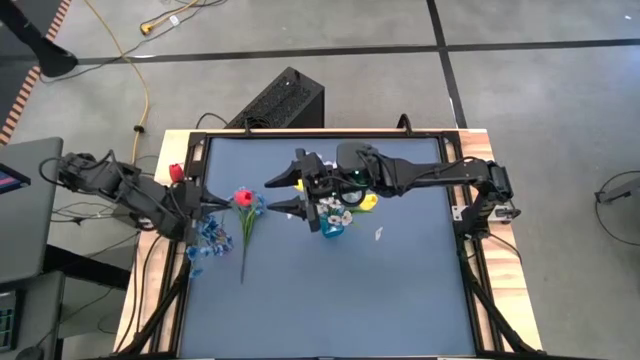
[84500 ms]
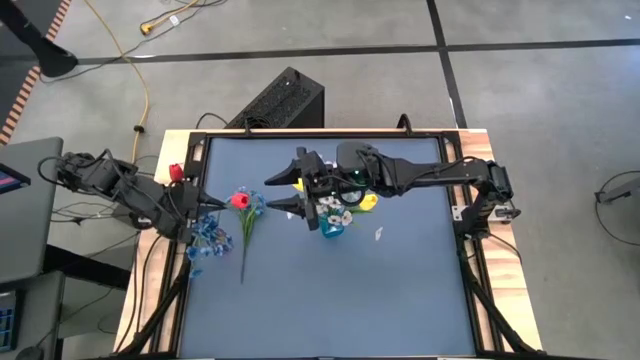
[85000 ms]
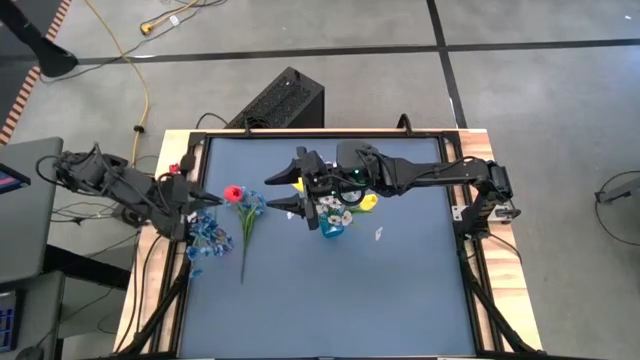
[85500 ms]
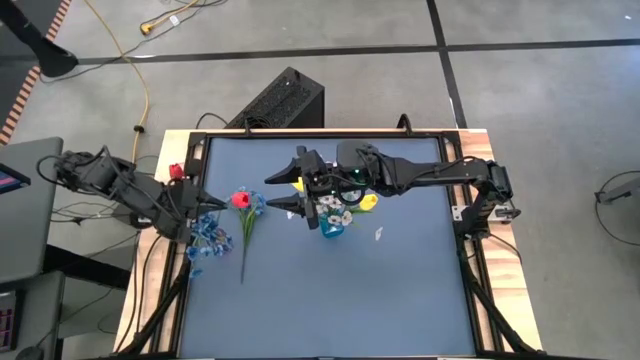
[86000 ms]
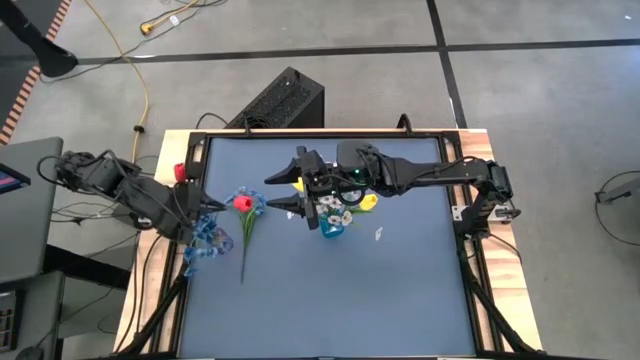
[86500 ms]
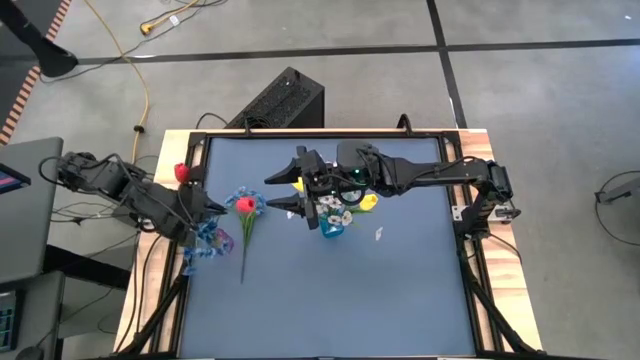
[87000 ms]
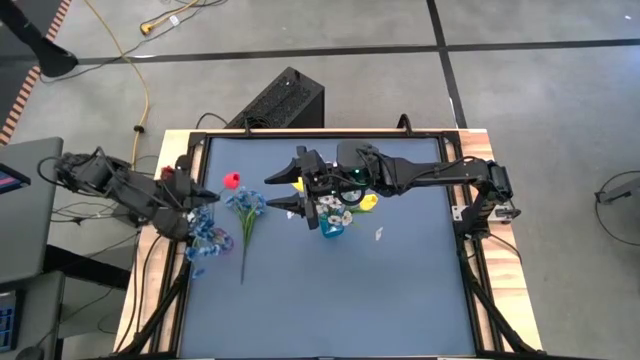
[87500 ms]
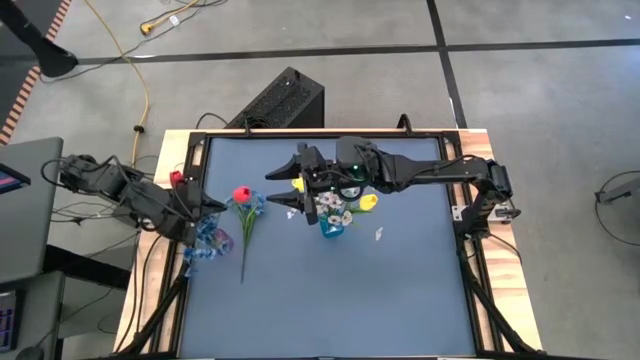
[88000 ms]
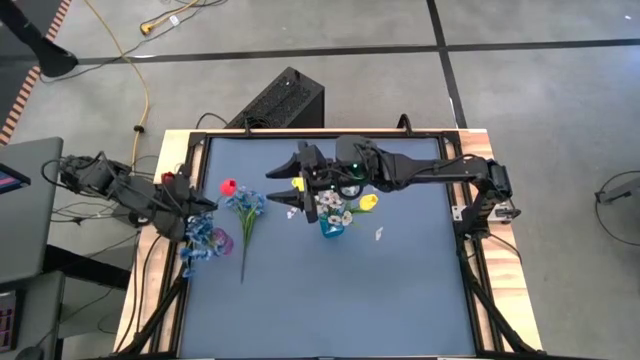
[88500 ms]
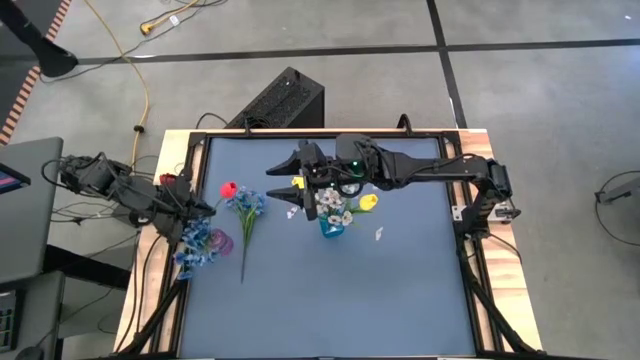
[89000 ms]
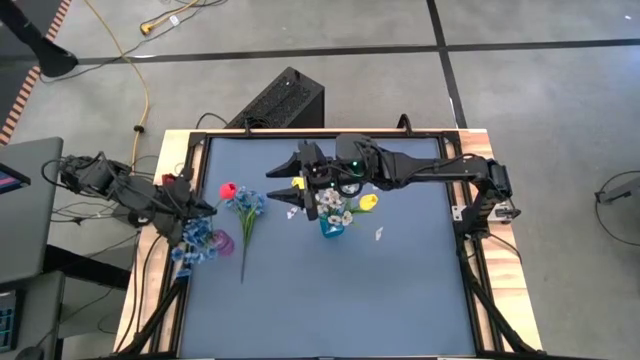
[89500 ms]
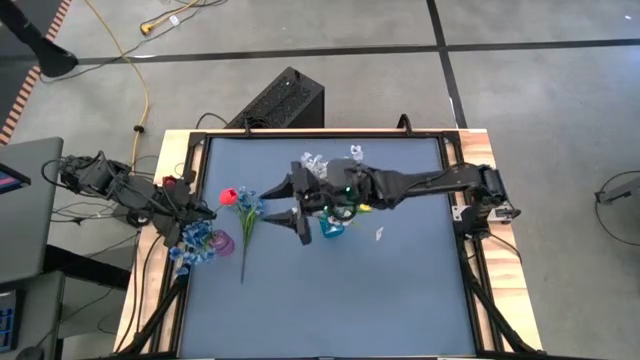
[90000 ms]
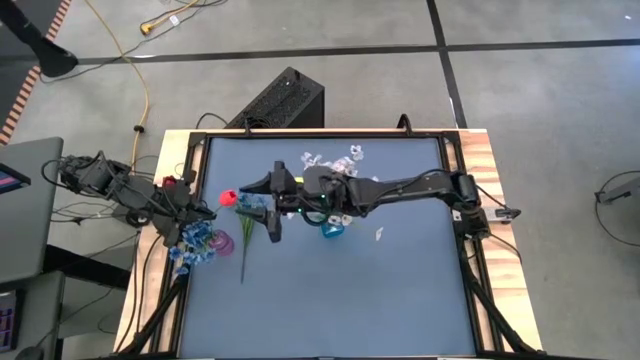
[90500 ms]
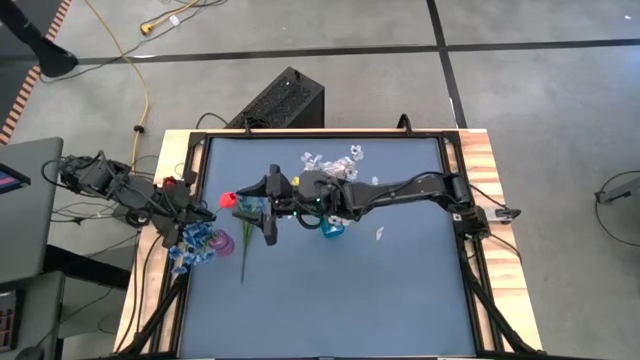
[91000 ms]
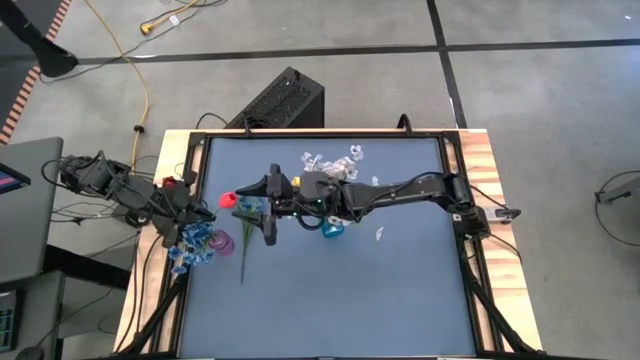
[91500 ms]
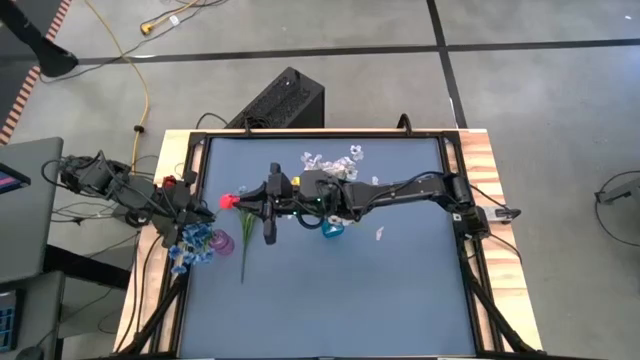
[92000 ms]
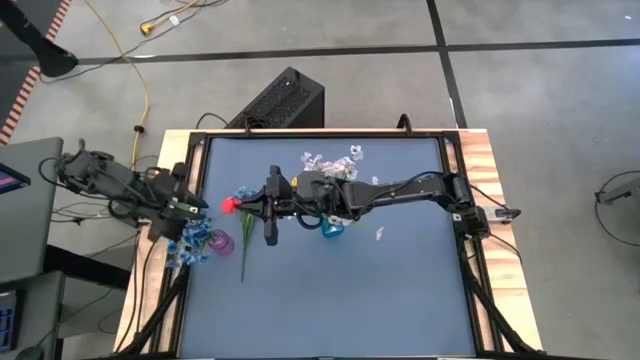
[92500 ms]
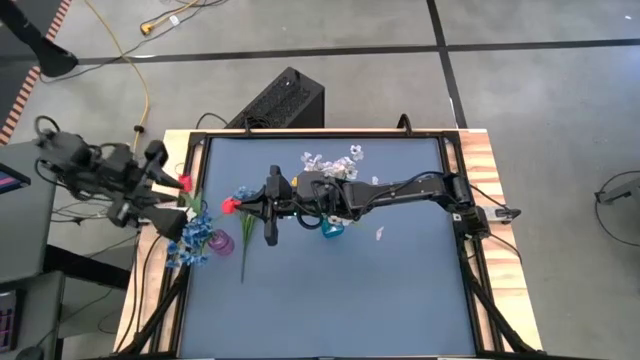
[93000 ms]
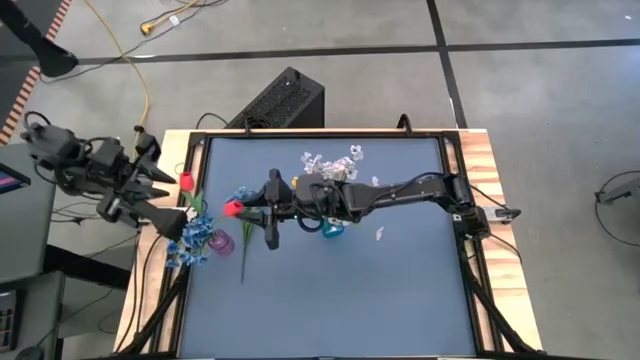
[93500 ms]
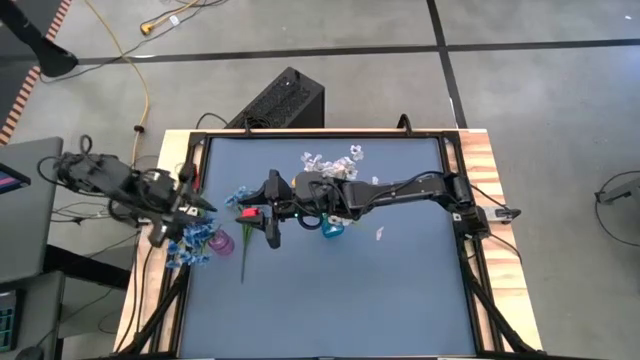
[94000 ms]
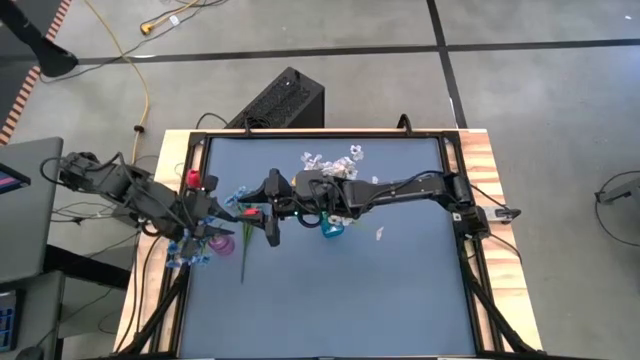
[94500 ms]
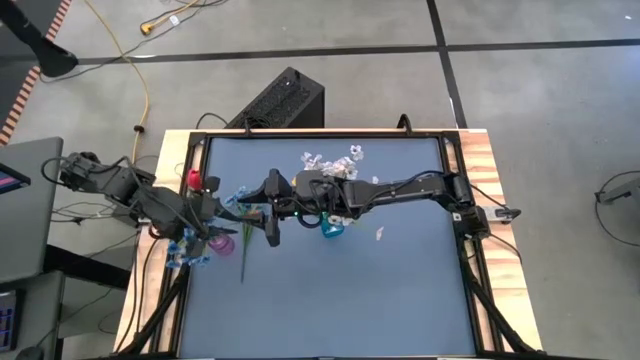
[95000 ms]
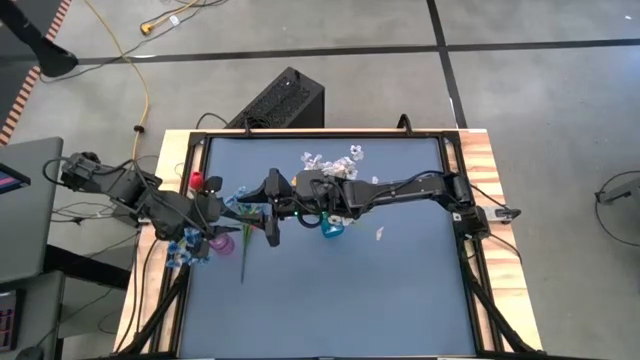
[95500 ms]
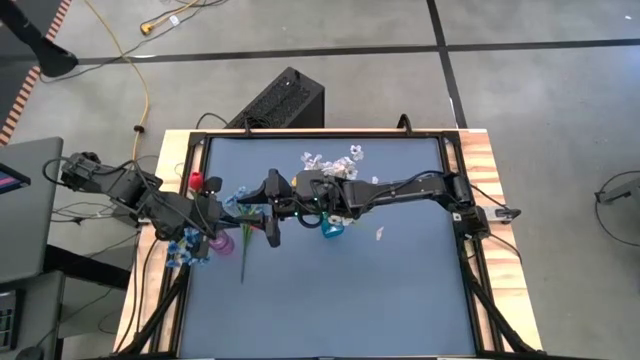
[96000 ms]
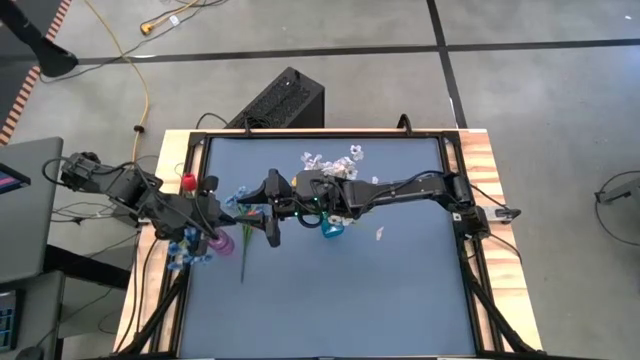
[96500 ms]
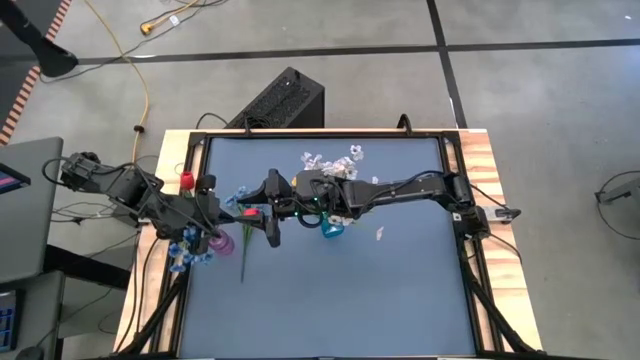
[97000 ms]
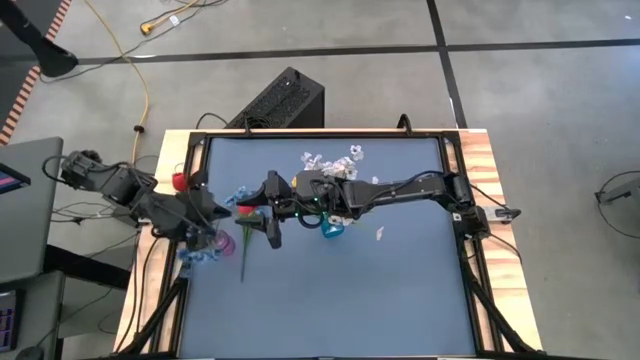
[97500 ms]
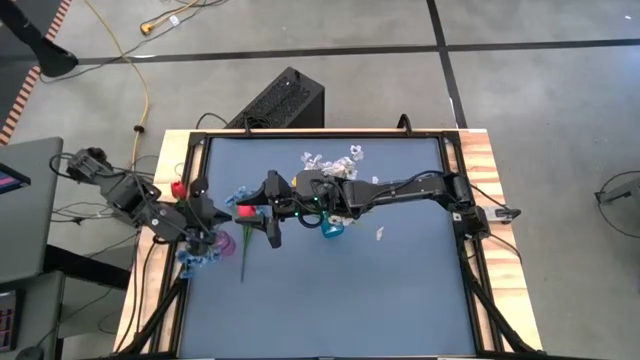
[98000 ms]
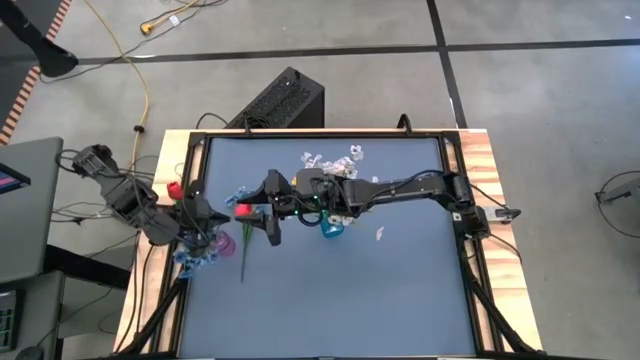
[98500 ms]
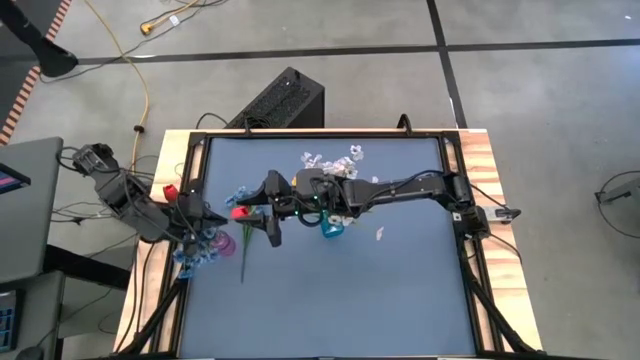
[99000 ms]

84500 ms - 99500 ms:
Task: Sort flowers into vase by color
Put the red tulip into the purple vase

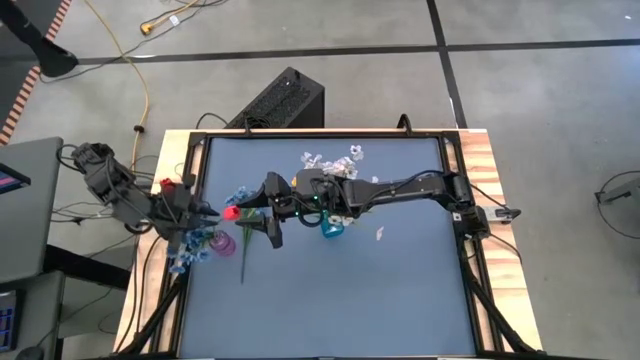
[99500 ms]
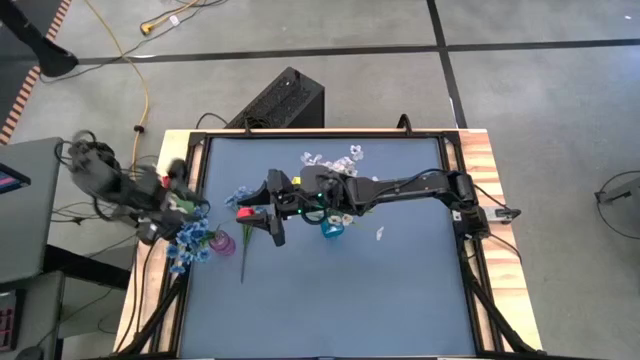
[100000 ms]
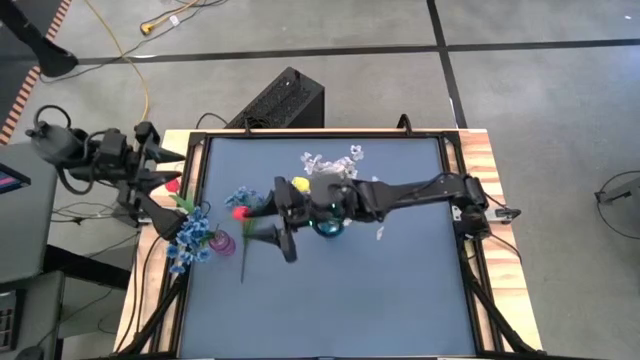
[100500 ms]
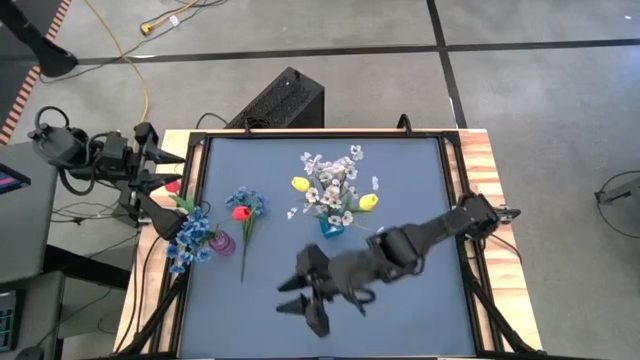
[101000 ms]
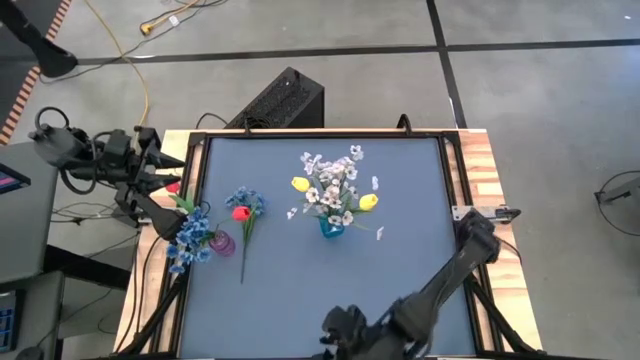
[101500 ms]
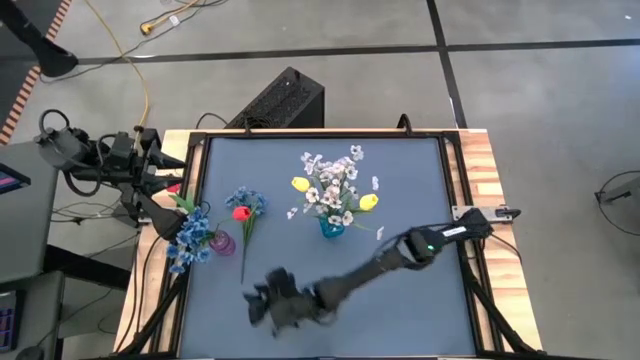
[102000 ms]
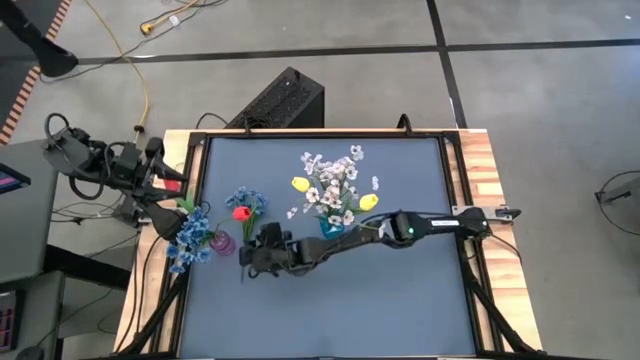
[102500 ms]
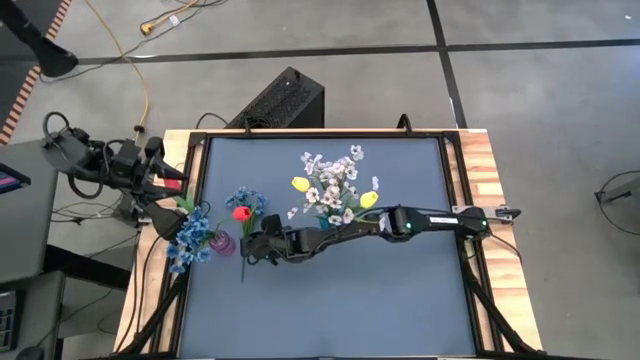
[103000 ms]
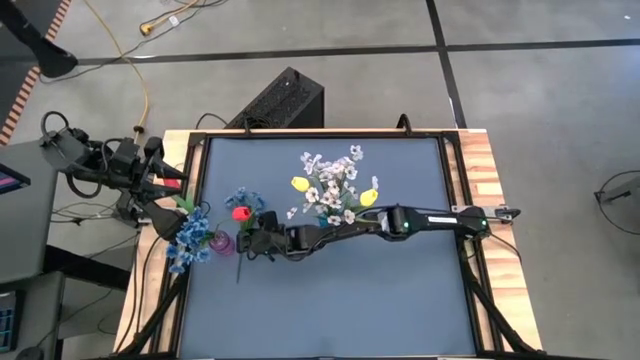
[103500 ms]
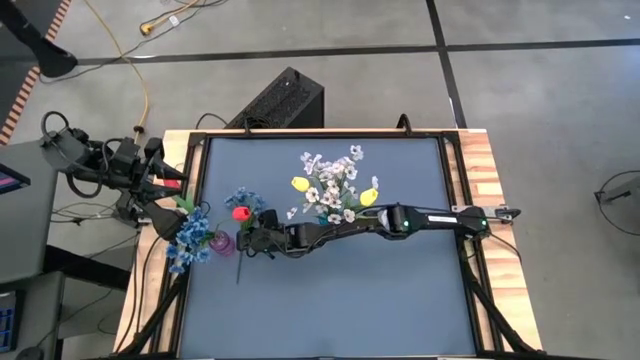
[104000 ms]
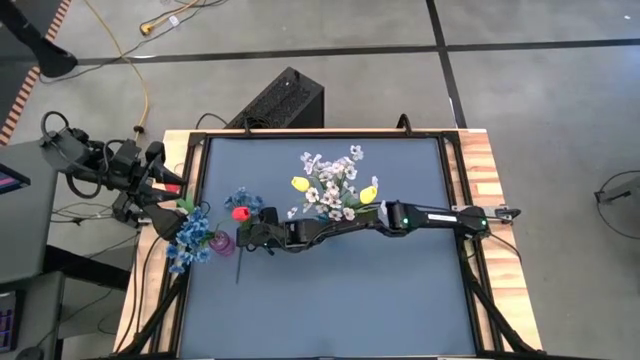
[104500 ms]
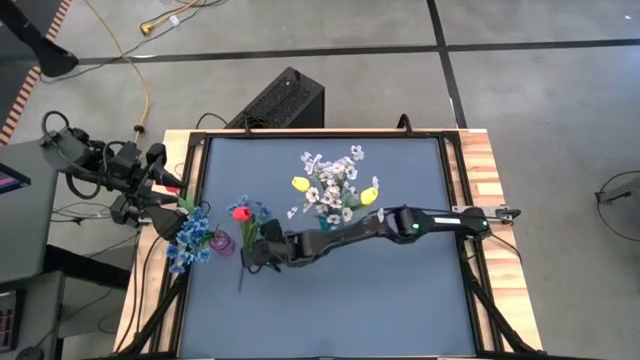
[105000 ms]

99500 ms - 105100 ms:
Put the blue flowers into the purple vase

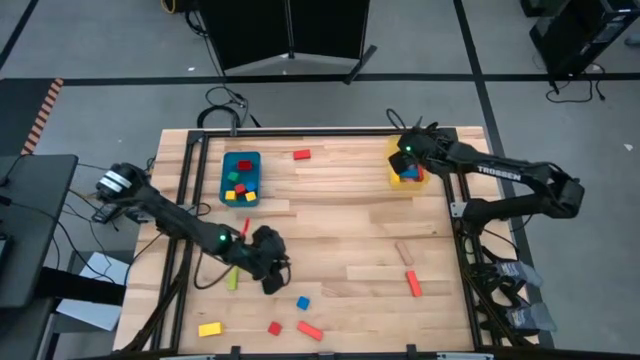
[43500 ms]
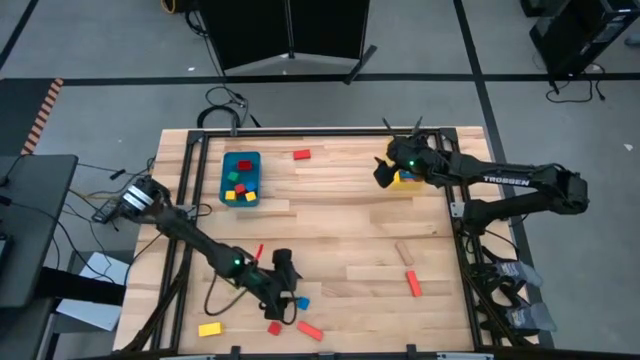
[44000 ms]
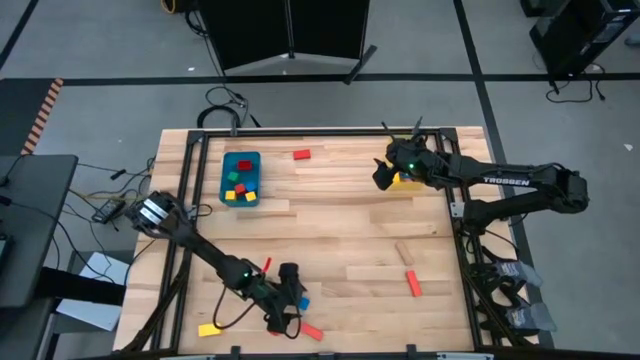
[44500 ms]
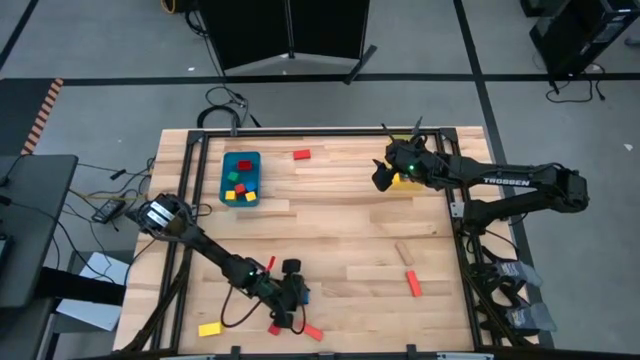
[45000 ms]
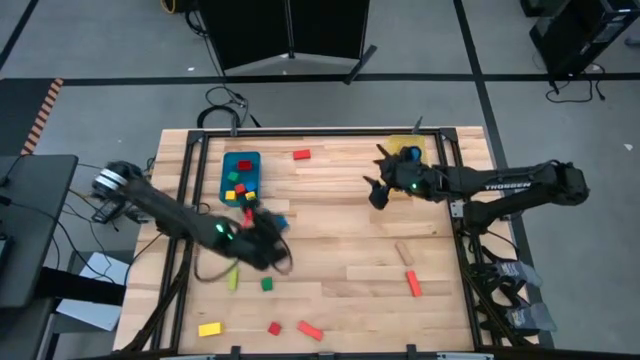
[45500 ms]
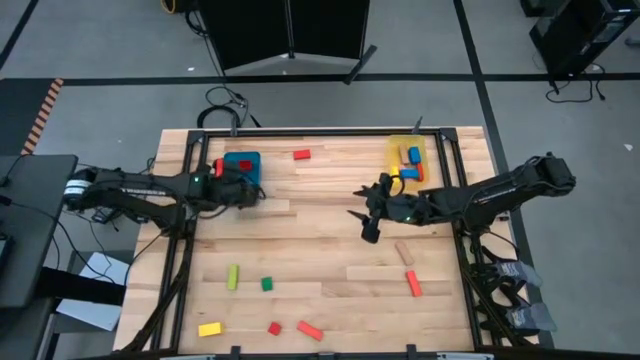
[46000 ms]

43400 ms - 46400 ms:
Task: Sort blocks by size
Put the small blue block into the blue bin
